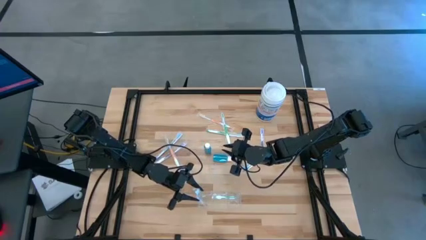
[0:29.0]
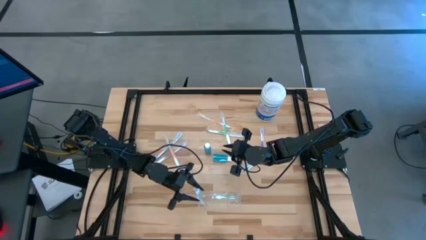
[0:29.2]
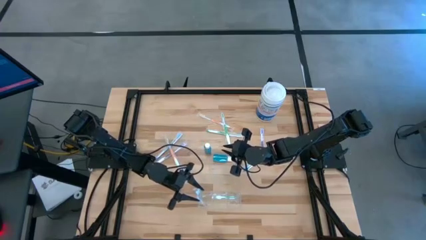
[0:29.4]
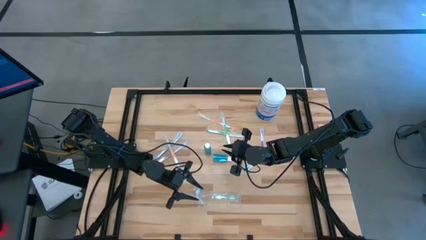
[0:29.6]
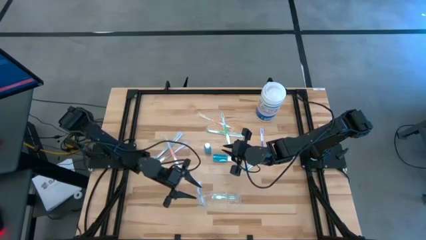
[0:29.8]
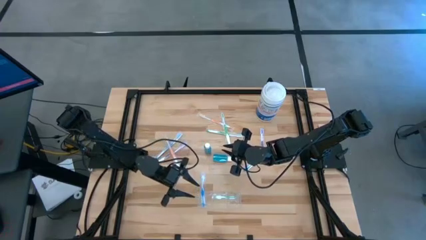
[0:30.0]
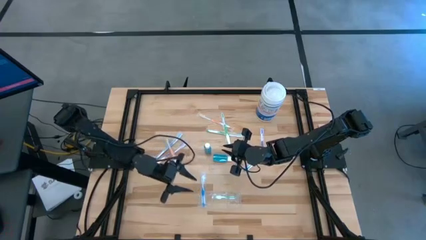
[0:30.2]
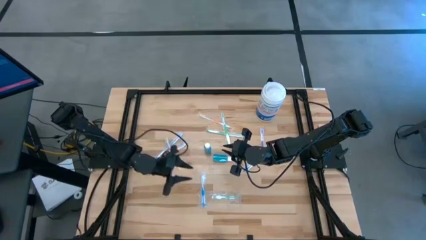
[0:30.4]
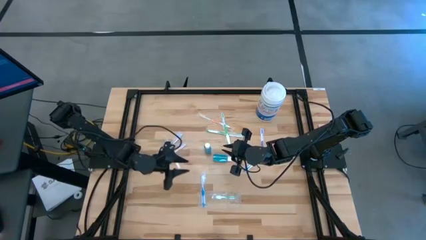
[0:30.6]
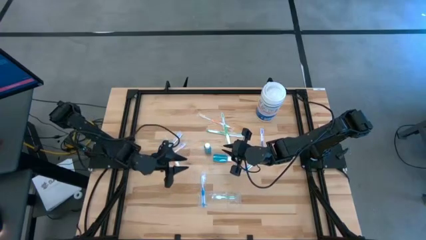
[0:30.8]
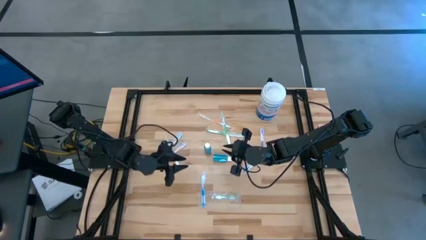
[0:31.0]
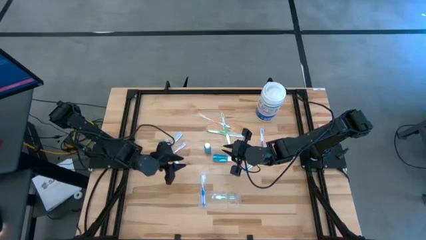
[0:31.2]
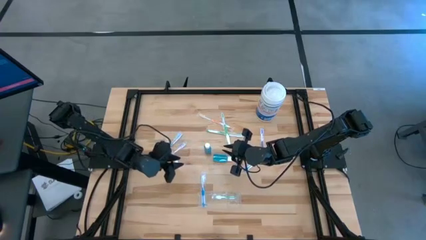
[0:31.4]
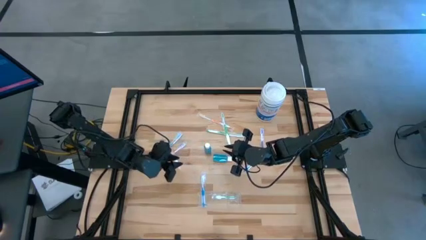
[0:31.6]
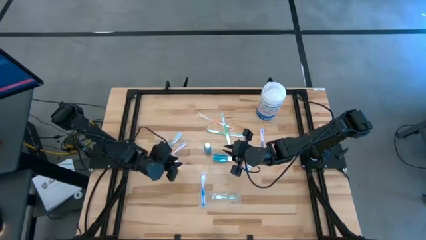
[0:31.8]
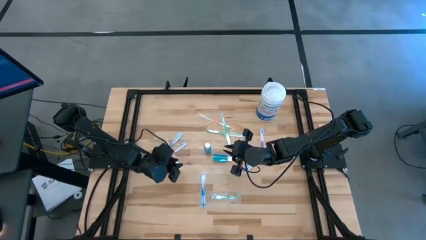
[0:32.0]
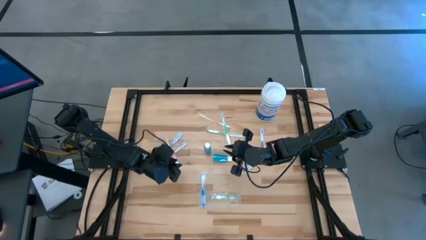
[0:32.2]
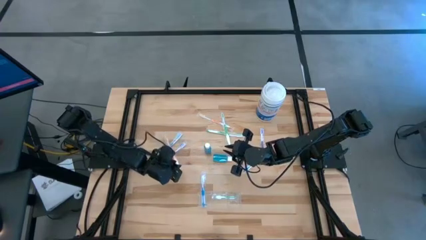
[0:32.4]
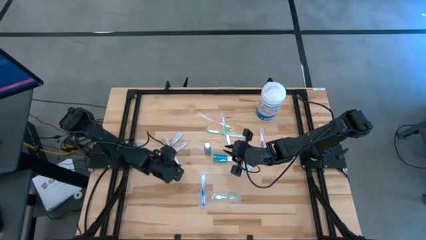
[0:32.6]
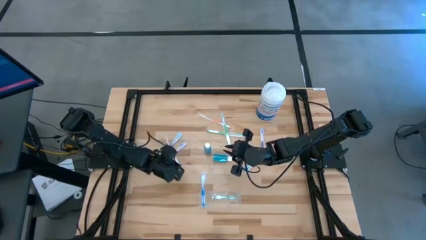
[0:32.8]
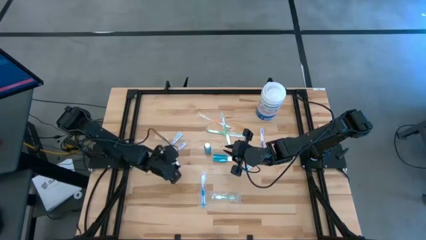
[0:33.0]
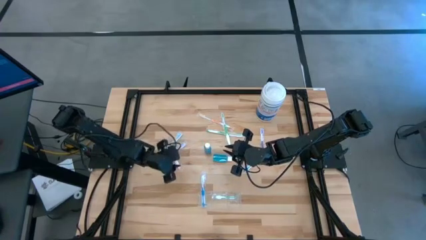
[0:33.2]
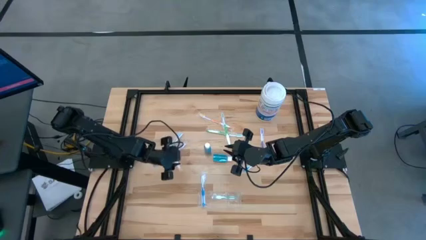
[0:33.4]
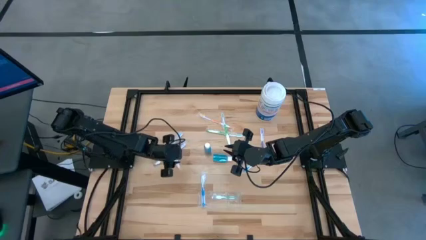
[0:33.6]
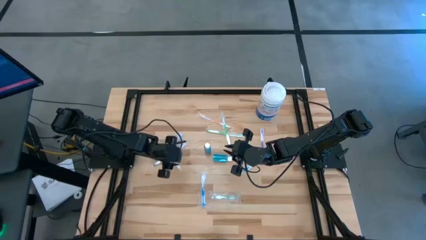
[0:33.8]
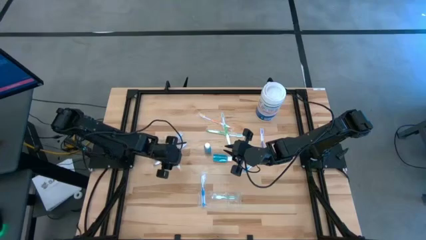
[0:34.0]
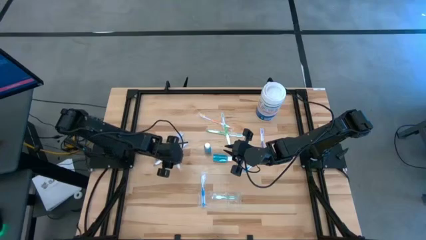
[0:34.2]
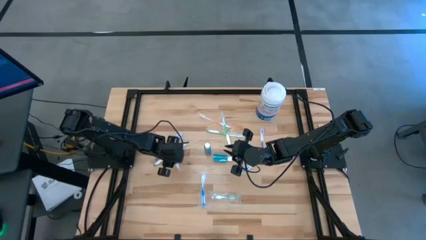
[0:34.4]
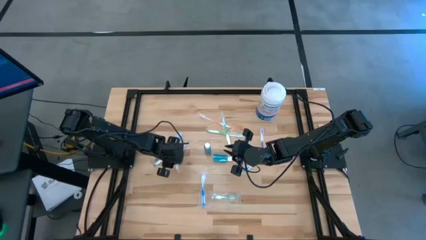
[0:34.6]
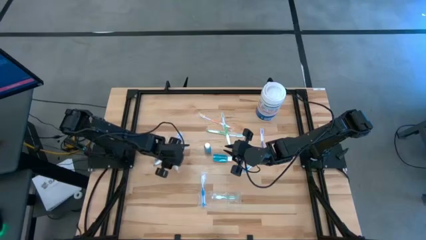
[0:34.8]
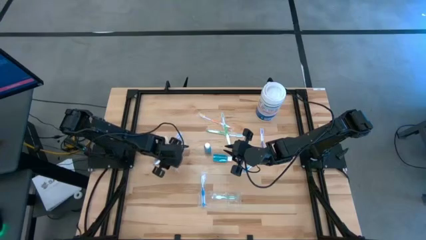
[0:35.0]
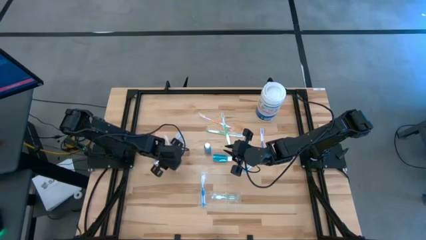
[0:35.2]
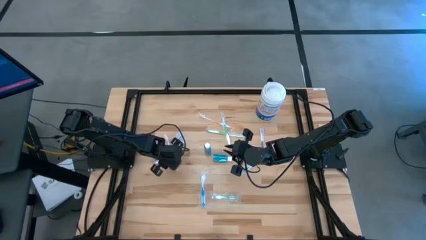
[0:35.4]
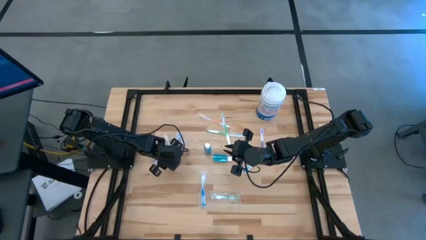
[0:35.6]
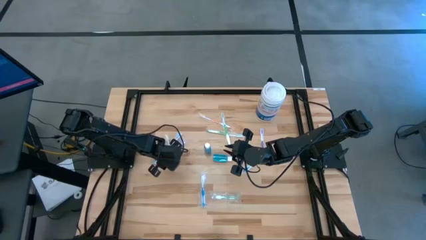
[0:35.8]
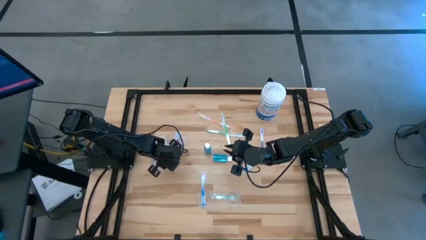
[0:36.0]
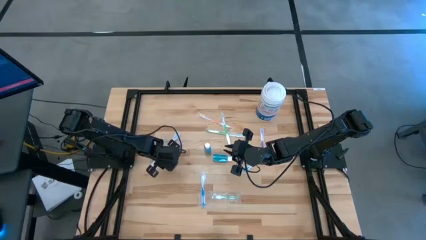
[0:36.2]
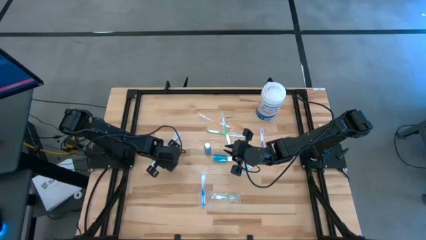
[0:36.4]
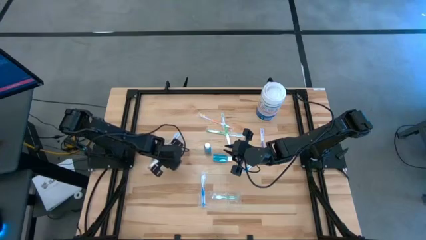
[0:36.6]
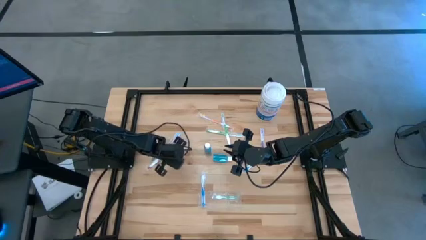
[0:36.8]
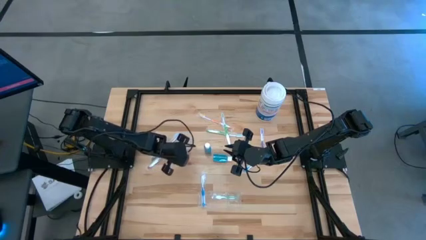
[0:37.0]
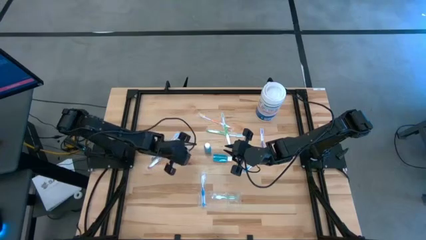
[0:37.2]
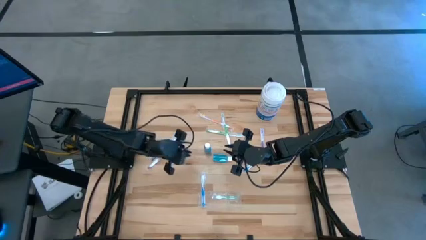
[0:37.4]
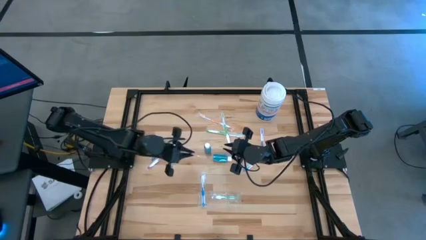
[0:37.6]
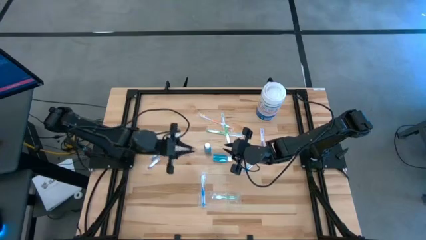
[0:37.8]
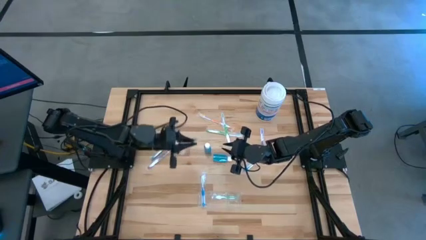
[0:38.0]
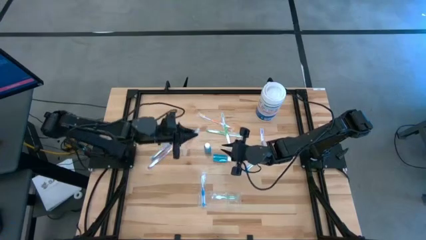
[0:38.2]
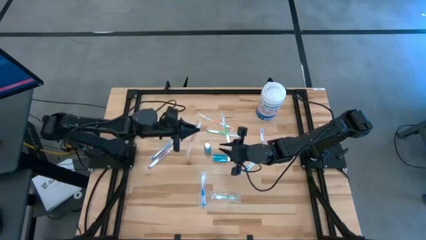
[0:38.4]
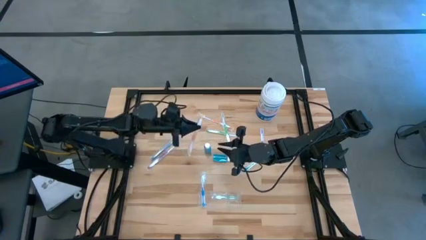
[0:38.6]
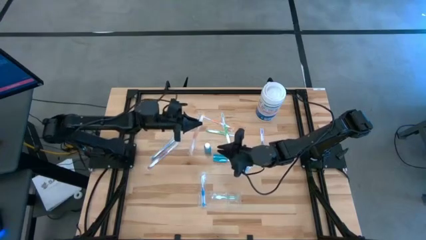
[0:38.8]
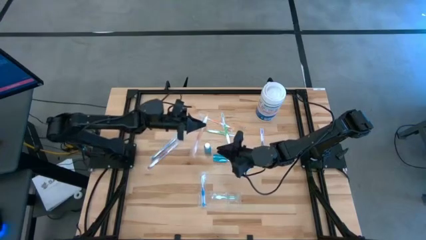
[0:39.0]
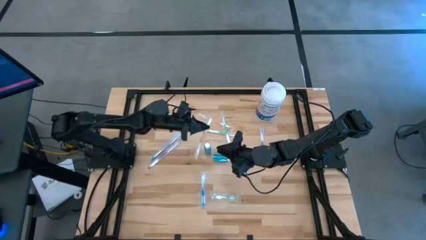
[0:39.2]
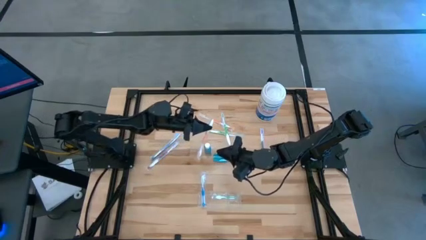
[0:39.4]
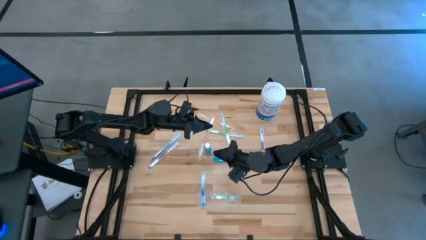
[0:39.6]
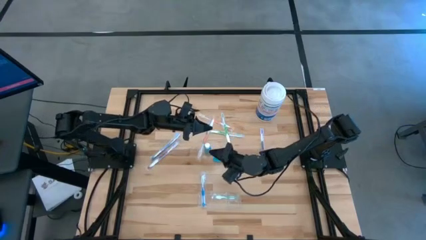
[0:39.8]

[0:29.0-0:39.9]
Task: Pick & Place toothbrushing station
Put the orange toothbrush into the transparent organizer

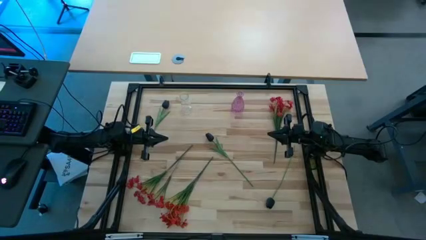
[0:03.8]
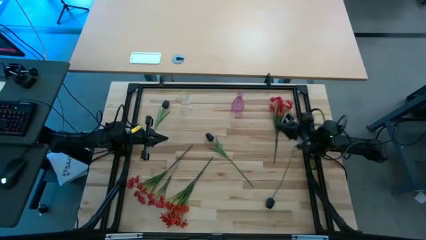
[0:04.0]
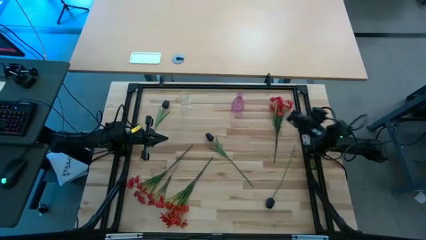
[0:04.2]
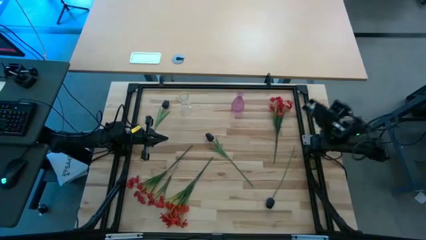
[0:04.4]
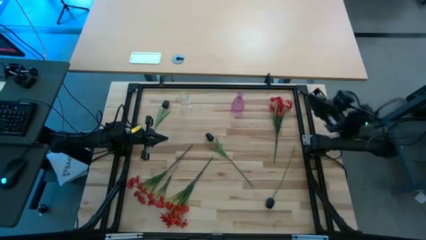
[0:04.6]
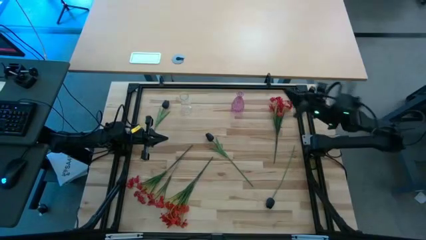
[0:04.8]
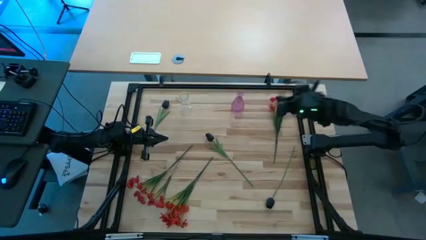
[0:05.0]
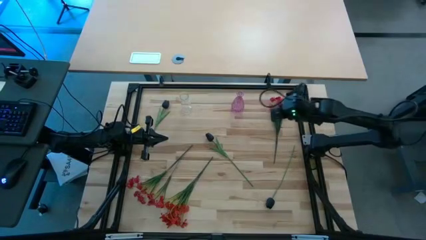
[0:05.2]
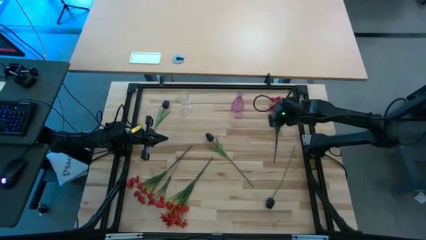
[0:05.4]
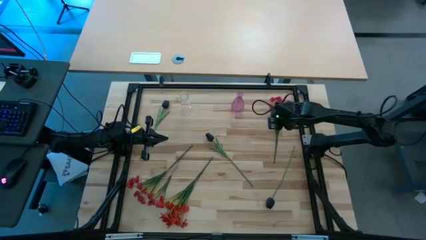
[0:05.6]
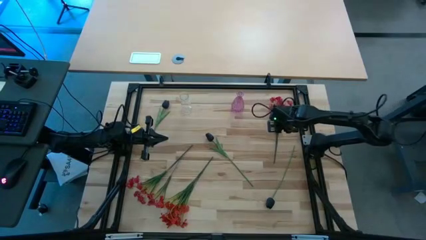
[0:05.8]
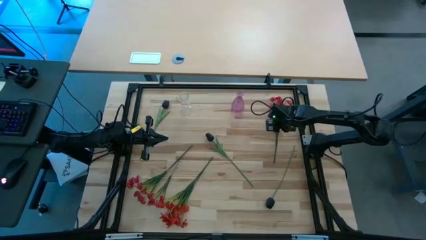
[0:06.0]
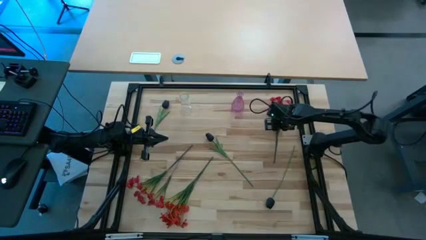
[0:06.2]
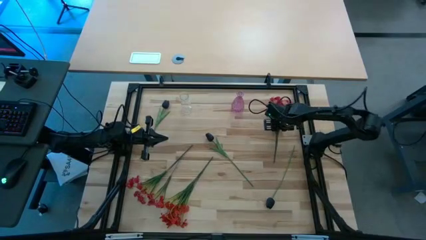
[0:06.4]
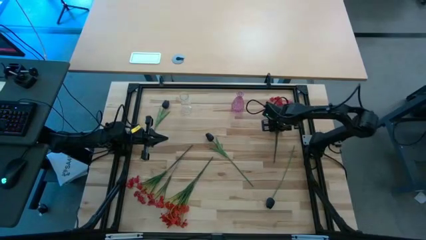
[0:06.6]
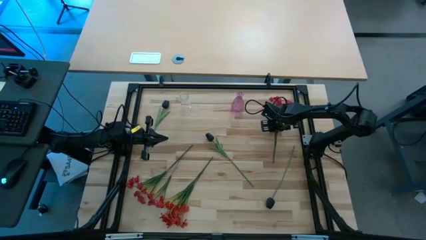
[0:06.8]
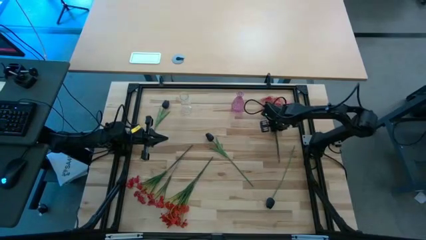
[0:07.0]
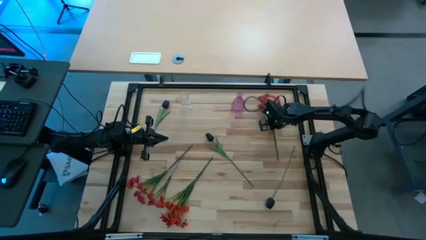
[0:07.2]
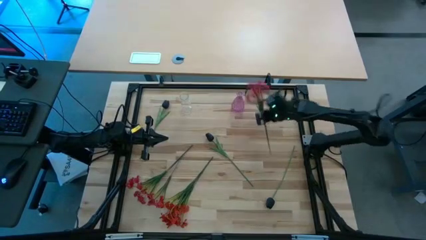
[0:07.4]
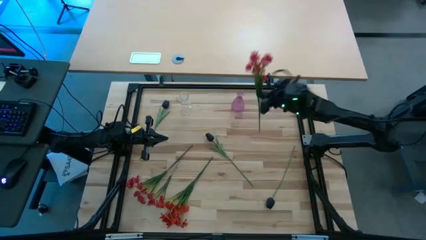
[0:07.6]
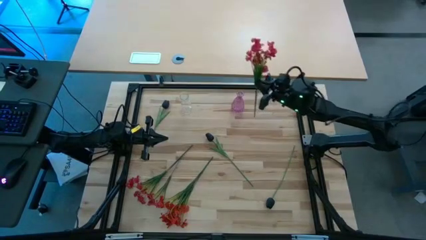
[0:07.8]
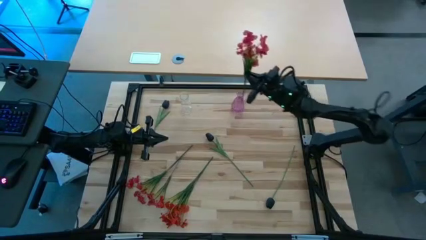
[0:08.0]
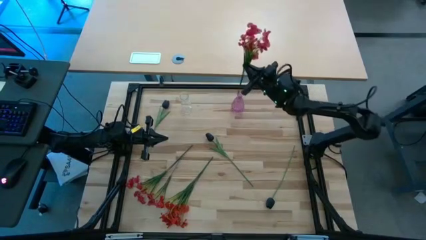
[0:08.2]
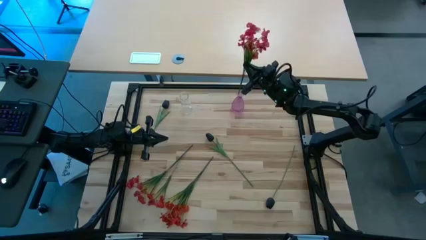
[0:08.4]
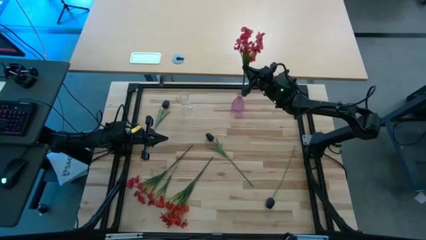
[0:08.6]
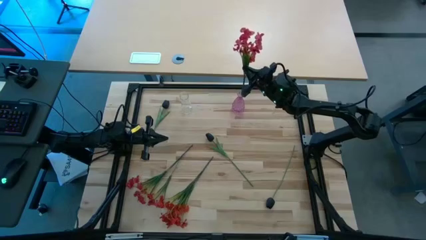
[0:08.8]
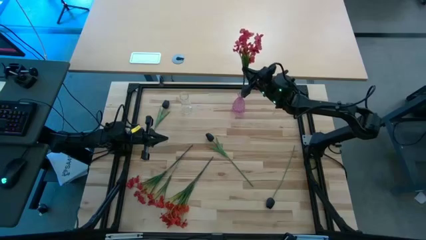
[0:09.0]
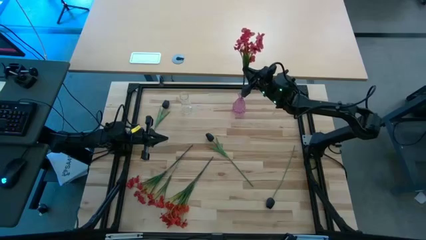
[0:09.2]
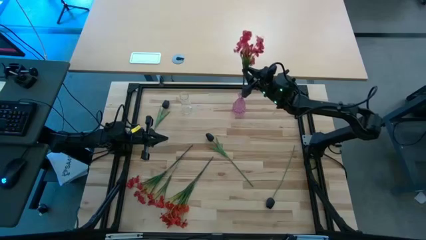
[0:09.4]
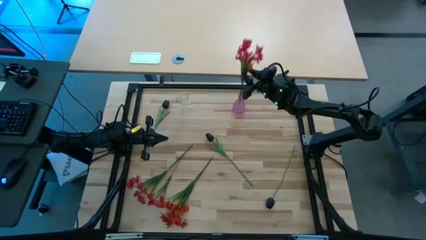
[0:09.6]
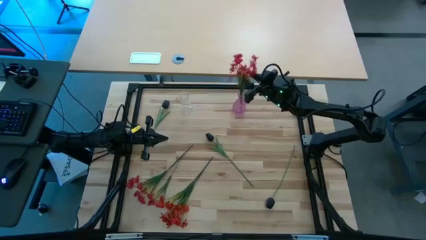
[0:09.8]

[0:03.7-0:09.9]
Task: Sort flowers into vase by color
Put the top red flowers into the purple vase
